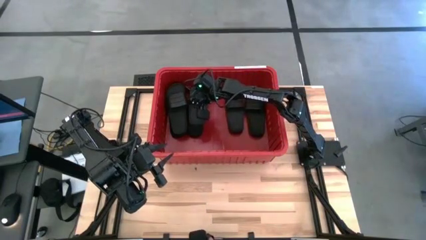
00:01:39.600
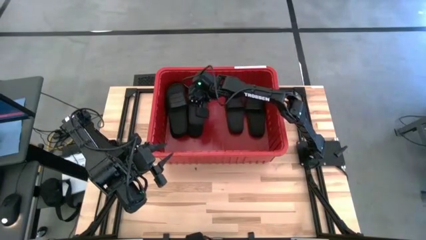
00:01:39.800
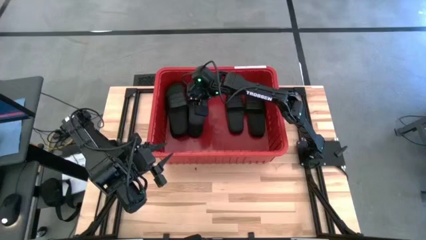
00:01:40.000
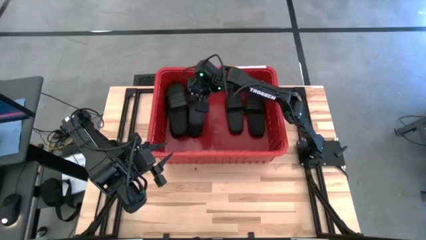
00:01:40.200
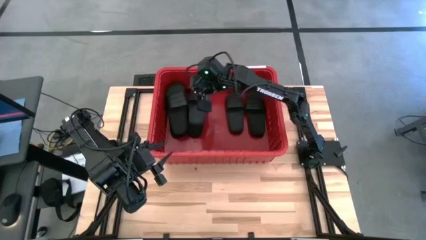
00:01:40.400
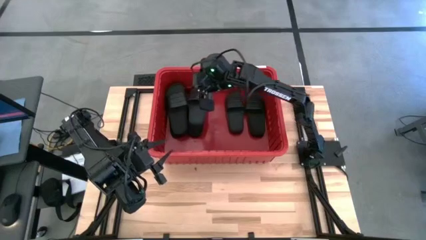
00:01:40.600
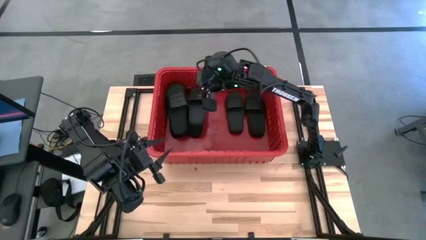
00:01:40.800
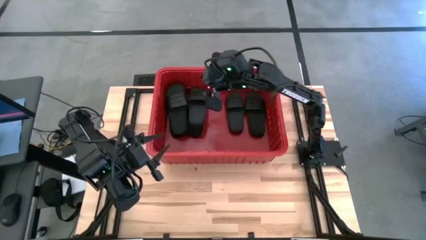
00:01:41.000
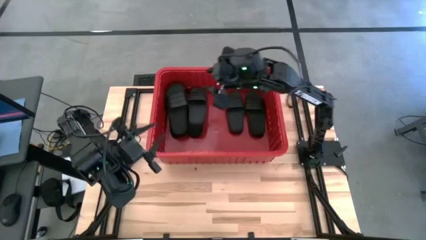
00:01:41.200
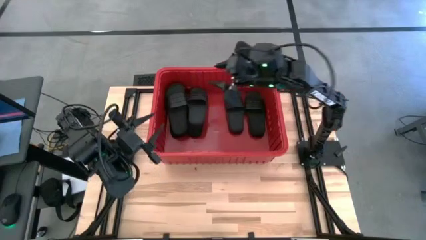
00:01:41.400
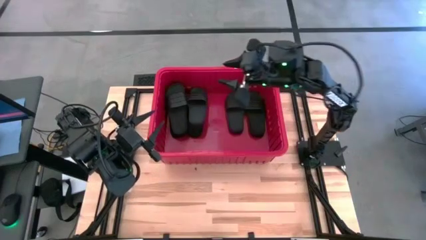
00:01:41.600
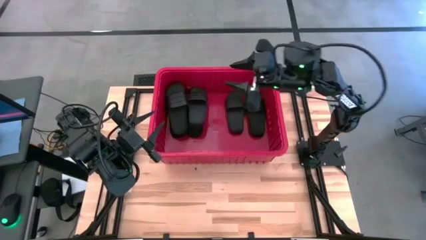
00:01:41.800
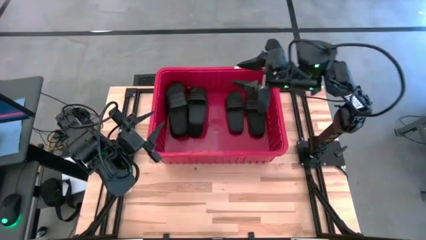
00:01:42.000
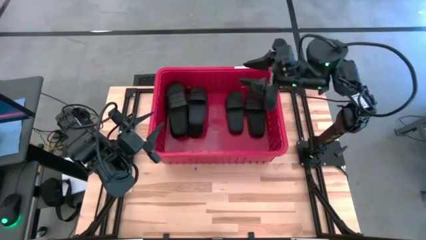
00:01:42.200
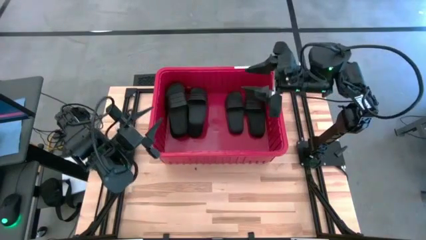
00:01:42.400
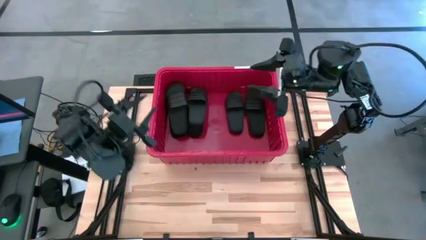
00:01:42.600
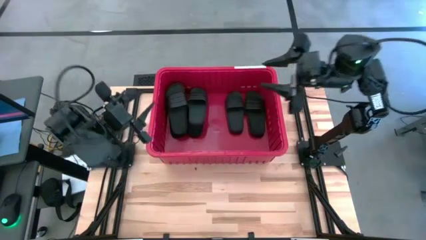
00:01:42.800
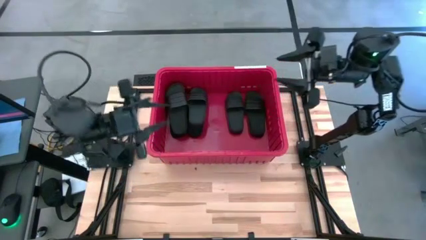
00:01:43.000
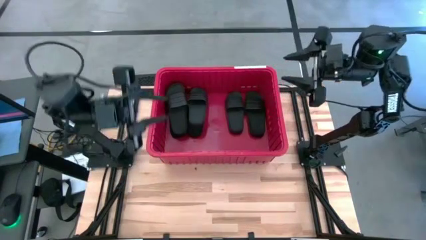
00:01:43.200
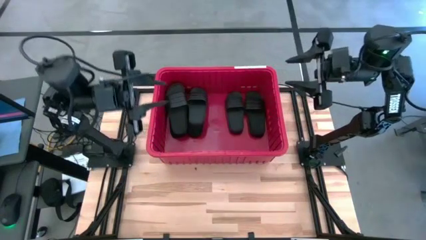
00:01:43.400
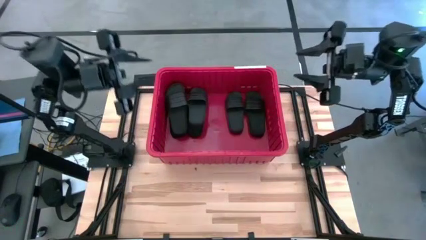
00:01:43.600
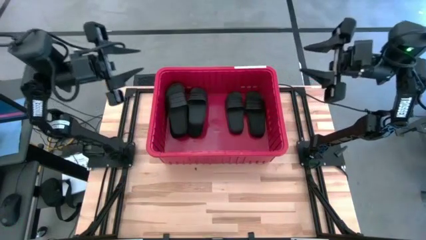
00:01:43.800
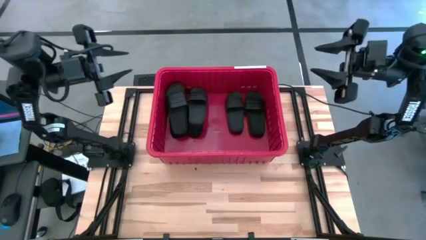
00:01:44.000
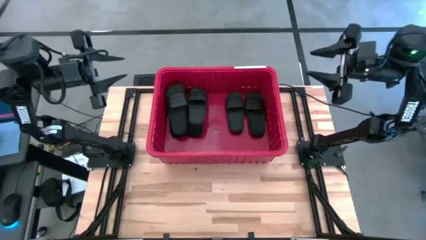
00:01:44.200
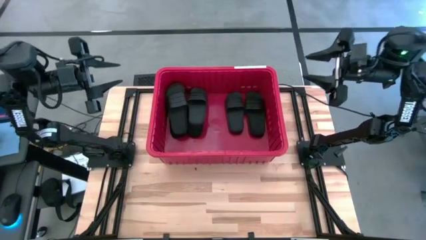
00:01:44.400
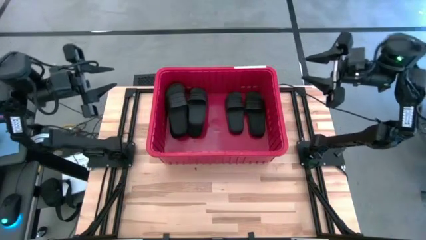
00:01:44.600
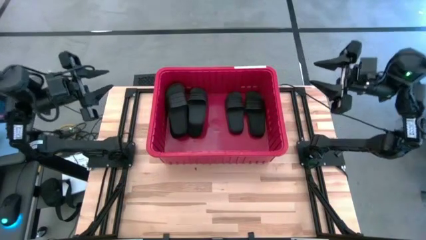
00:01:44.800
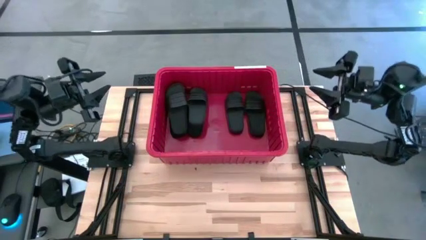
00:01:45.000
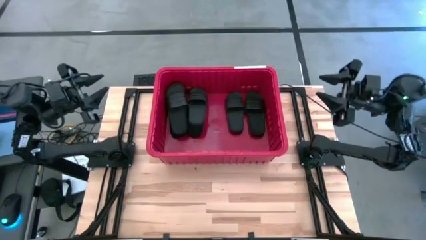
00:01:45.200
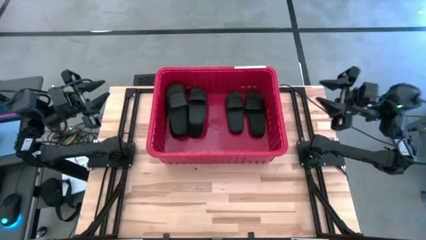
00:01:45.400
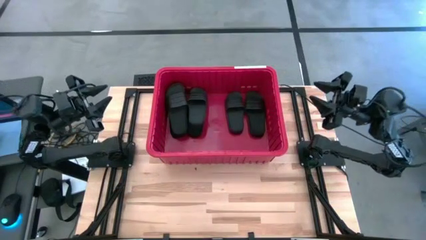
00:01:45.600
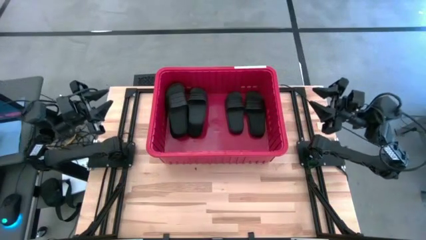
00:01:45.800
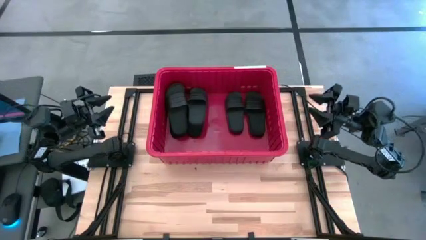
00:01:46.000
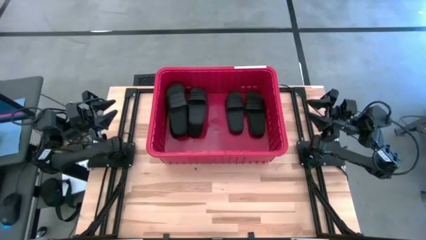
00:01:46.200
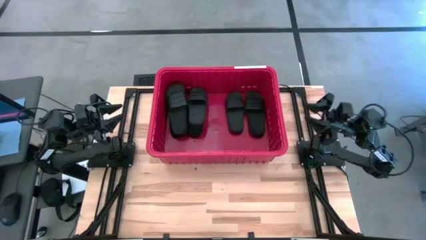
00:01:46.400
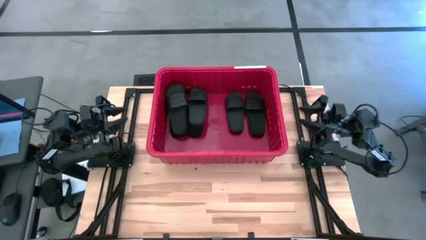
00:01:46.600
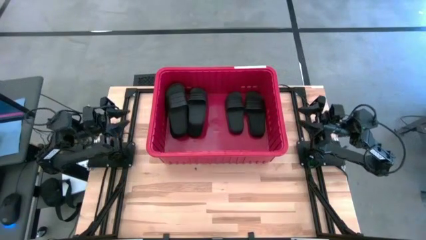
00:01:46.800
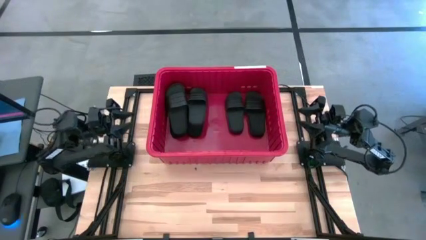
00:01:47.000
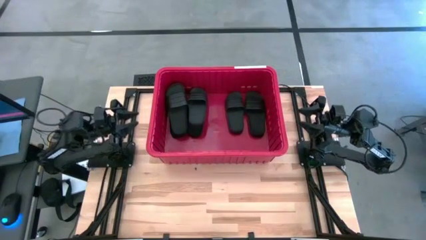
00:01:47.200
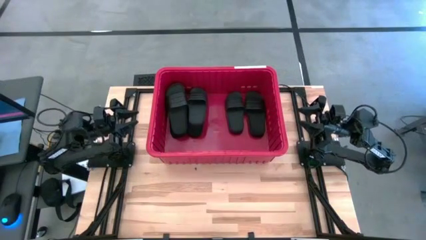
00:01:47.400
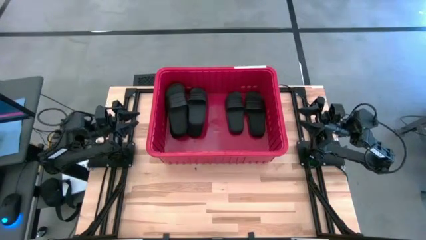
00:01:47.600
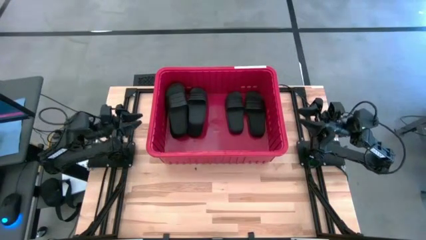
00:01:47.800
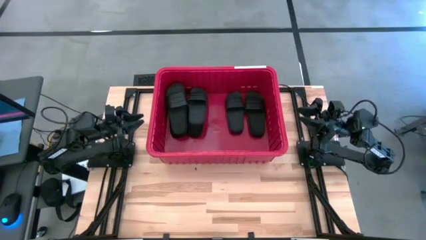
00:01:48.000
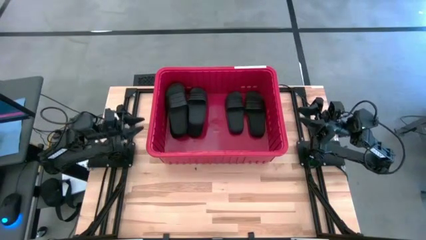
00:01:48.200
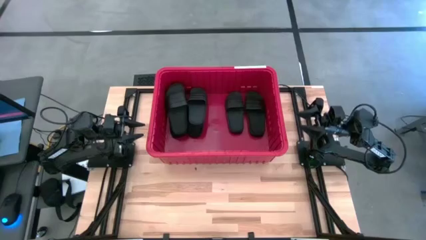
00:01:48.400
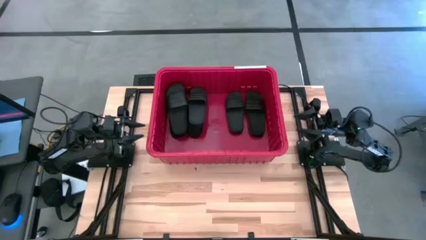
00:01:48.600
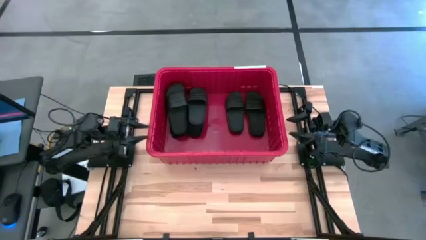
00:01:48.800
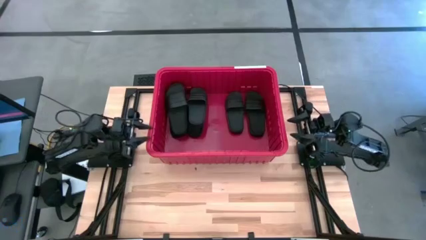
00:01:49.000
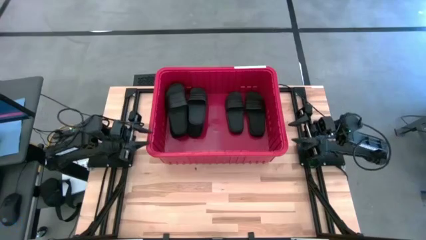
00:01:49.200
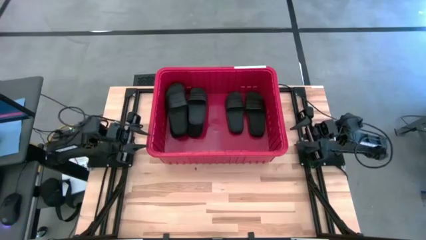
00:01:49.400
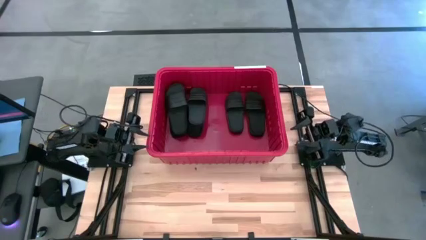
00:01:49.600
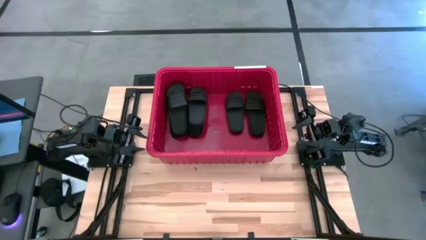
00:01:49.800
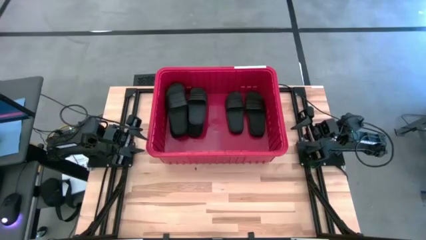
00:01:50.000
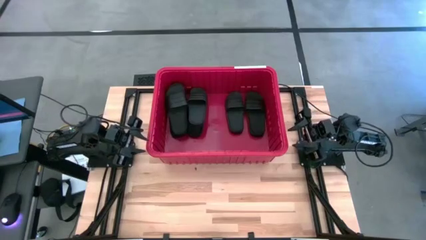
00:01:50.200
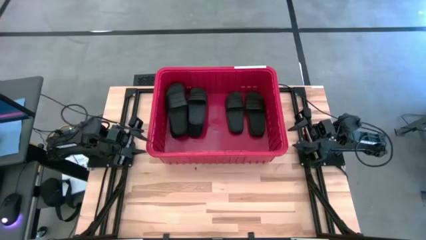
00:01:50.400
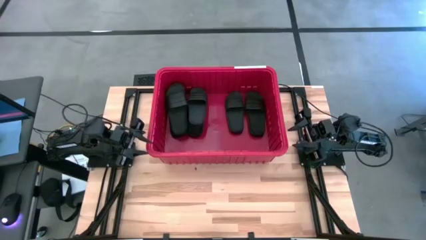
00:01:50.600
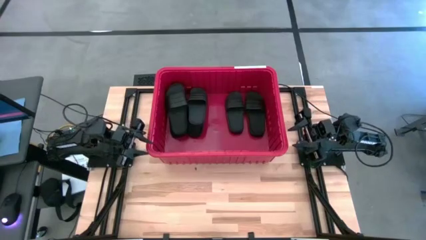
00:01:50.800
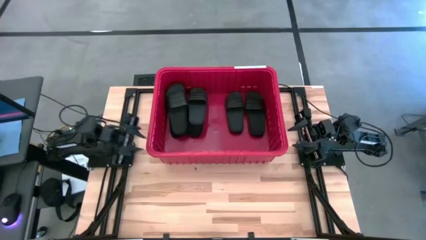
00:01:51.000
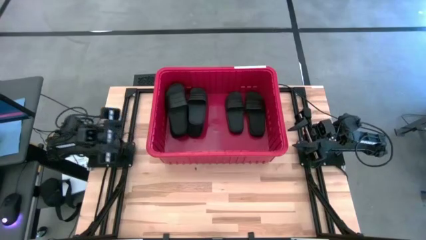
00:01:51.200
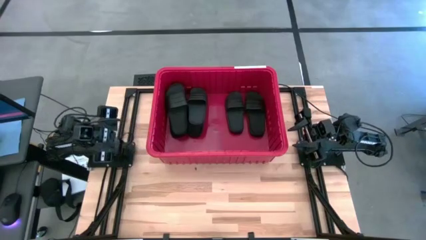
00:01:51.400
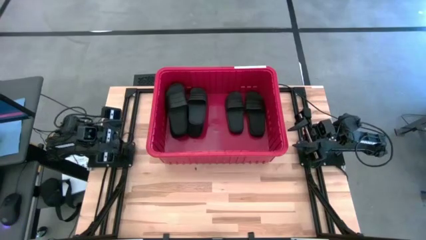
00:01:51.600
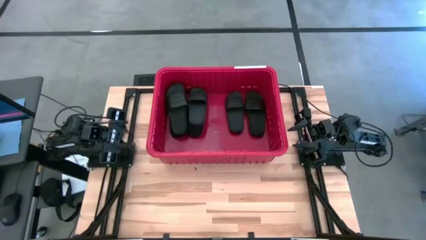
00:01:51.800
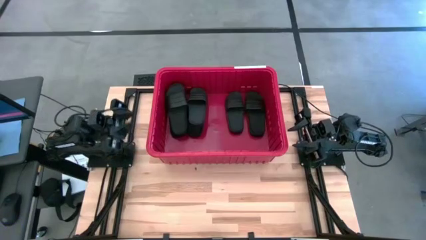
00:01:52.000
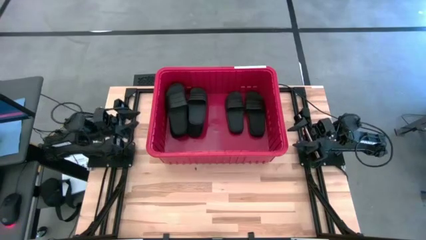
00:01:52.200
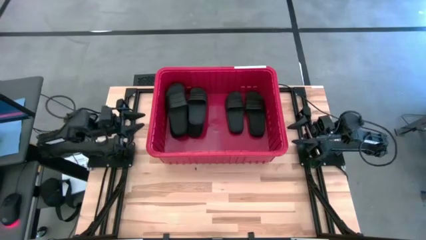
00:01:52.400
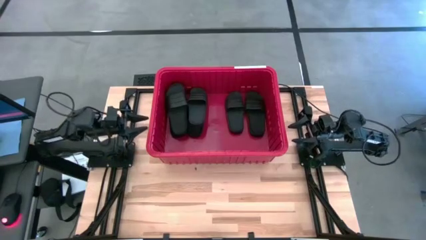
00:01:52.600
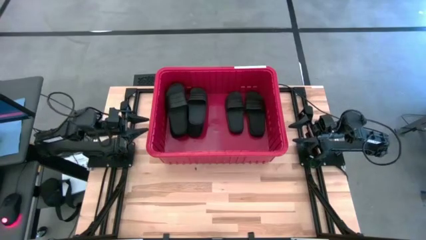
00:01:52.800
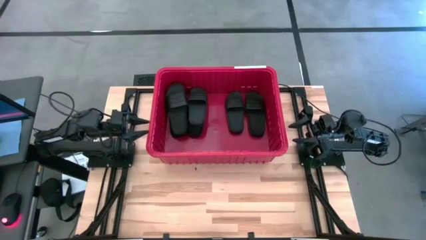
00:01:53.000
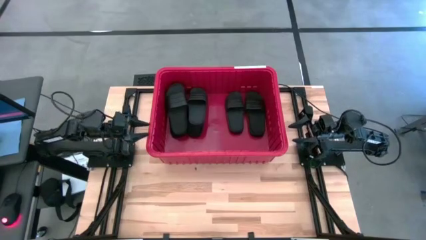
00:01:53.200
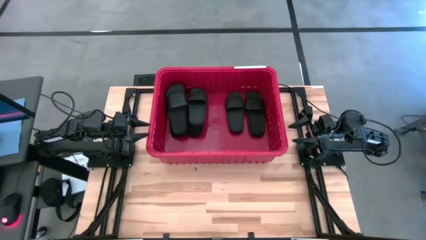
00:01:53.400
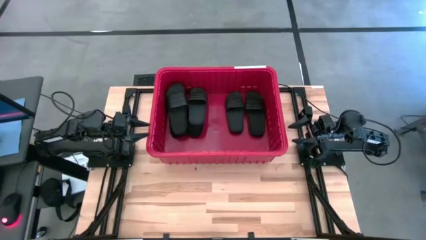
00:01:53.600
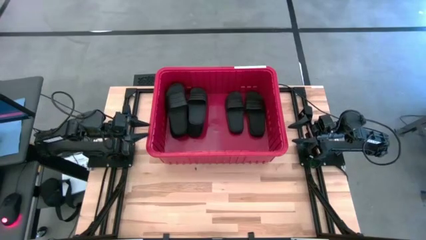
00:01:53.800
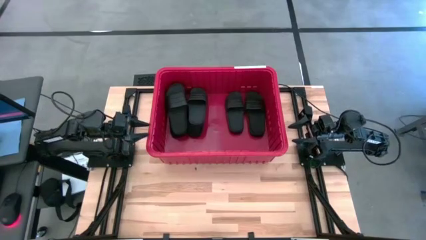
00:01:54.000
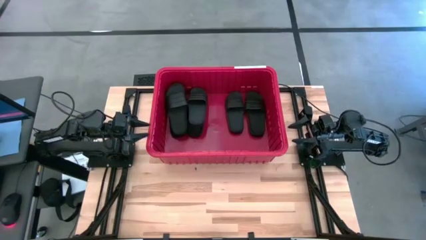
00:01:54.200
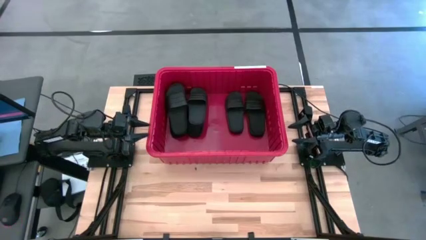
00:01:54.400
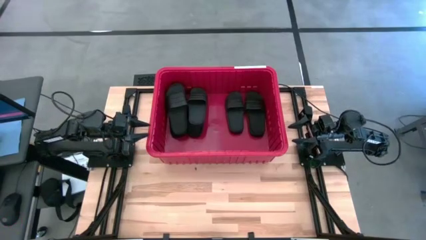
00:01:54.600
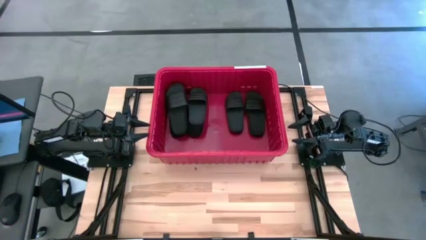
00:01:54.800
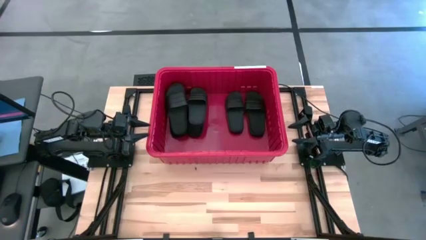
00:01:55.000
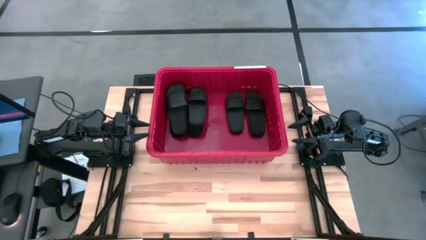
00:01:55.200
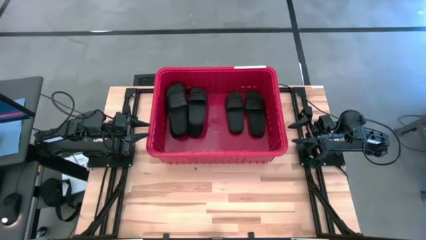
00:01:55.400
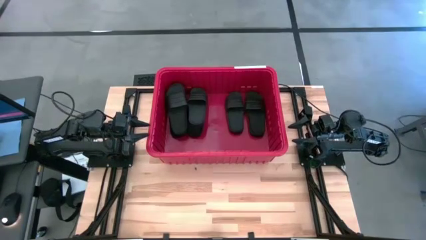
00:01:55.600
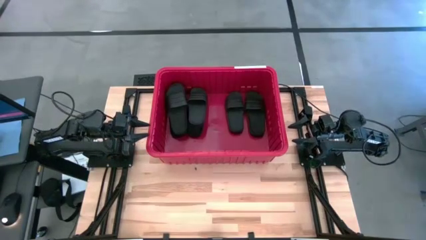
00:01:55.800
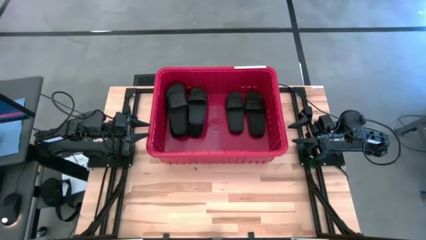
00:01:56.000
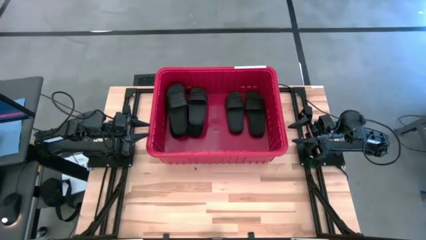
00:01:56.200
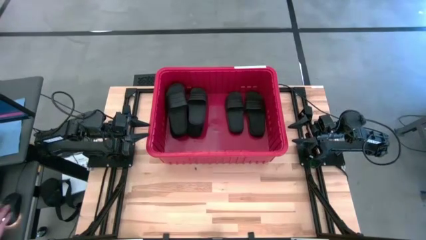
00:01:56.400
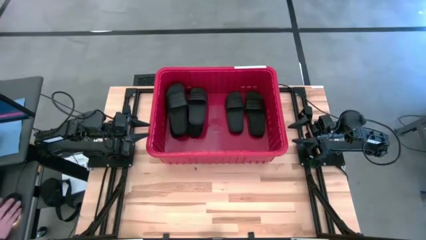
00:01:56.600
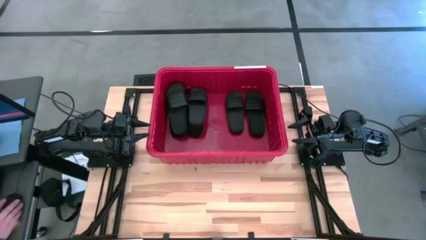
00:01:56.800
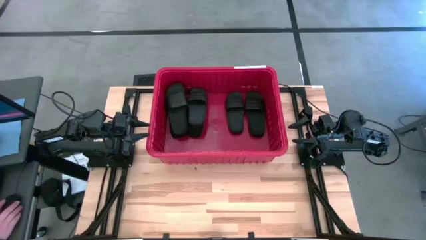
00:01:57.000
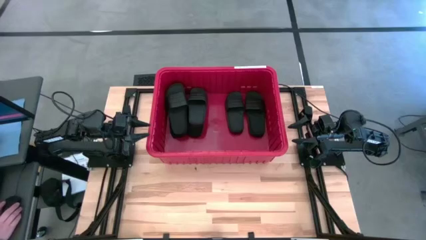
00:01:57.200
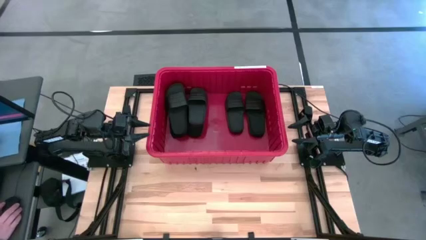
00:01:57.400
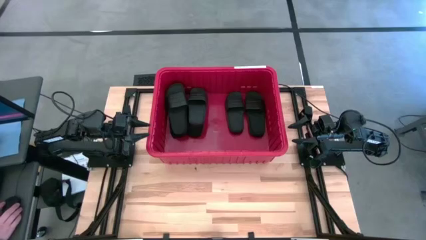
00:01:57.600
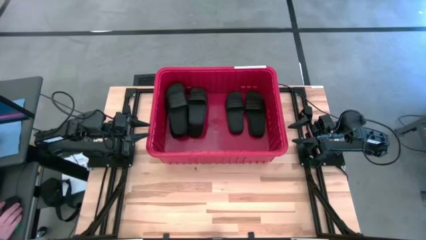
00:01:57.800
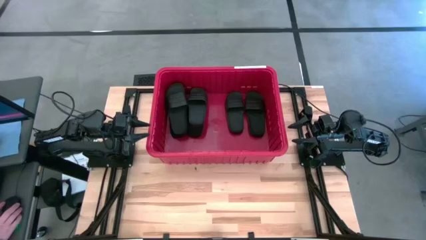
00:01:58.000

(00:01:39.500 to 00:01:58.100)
Task: Pick and place slides into bin
Return to Home Position
